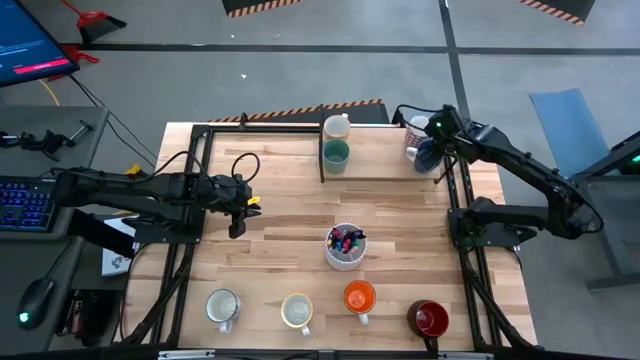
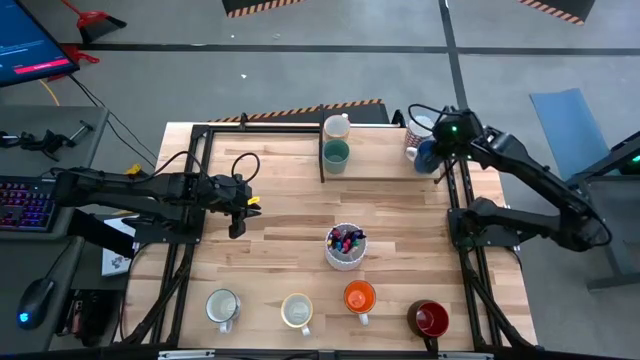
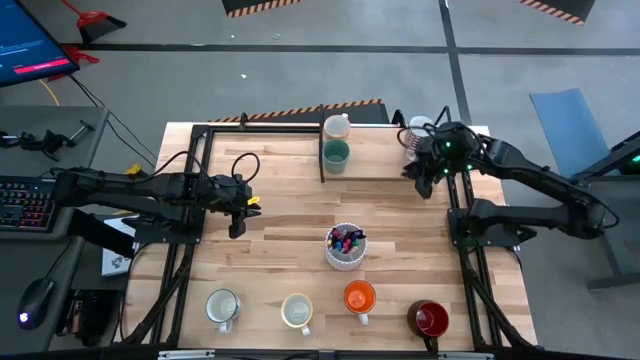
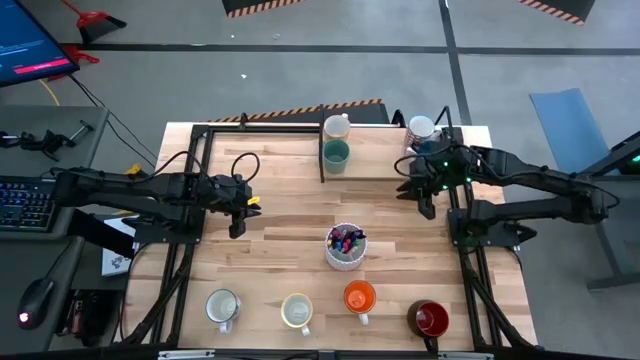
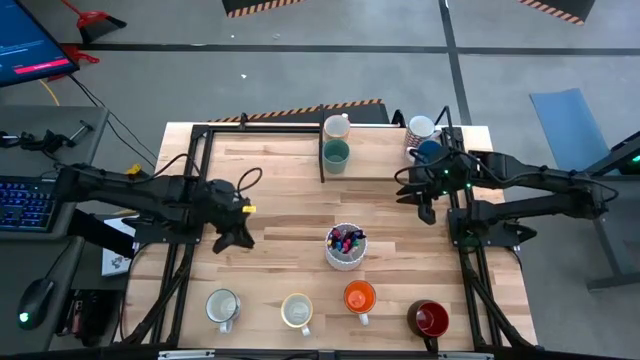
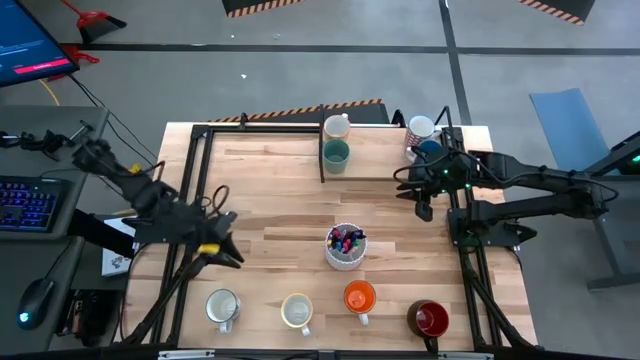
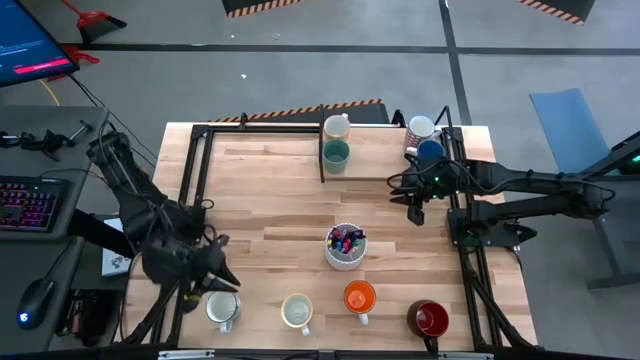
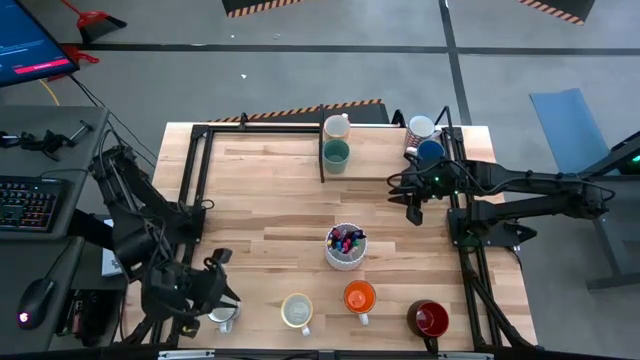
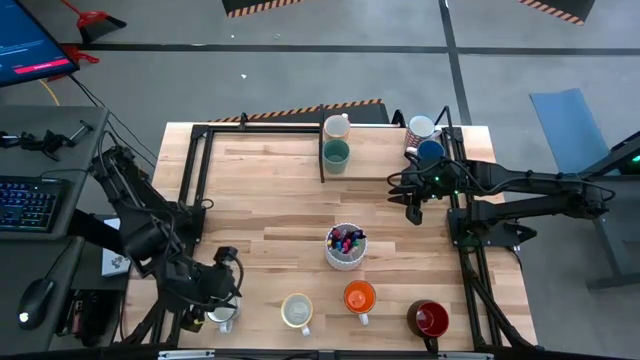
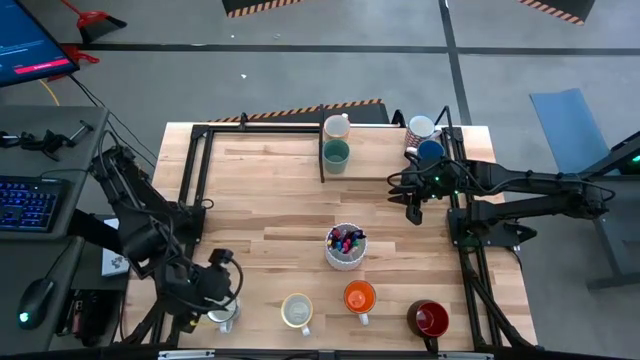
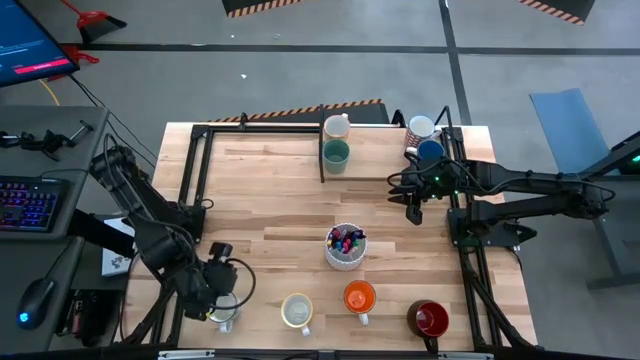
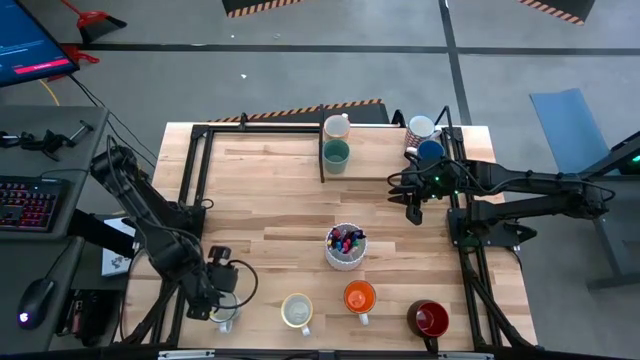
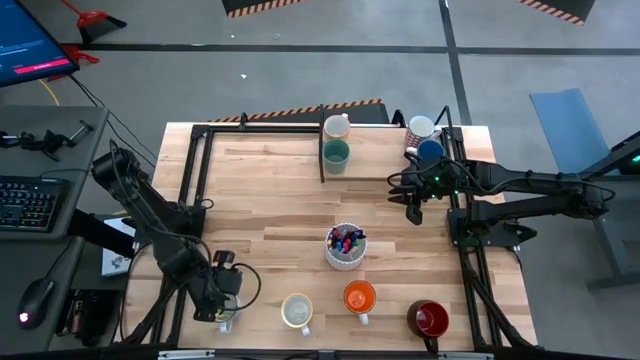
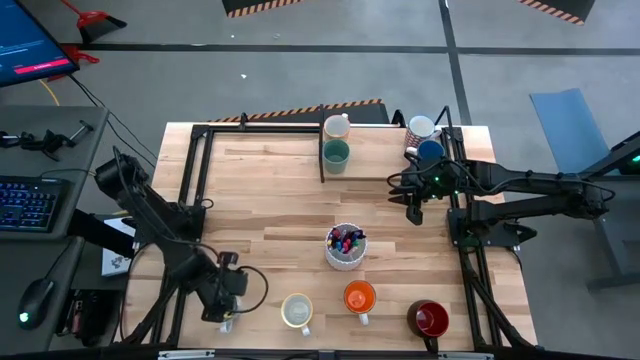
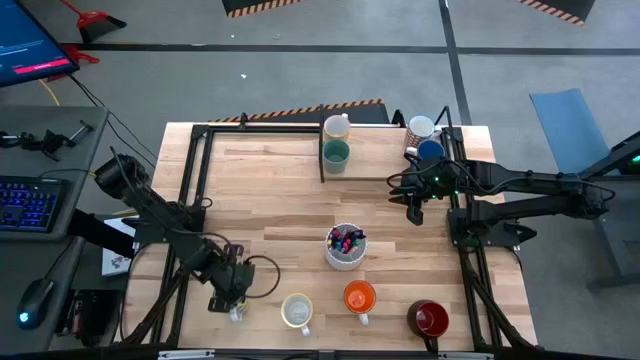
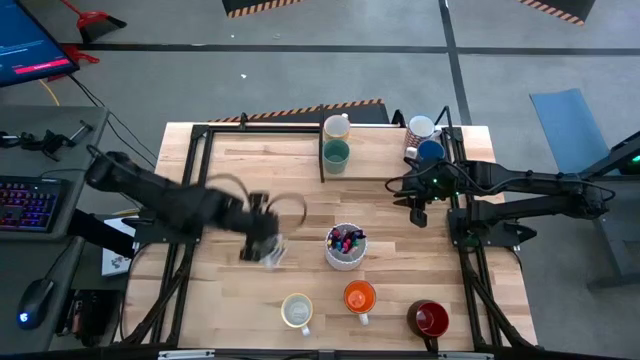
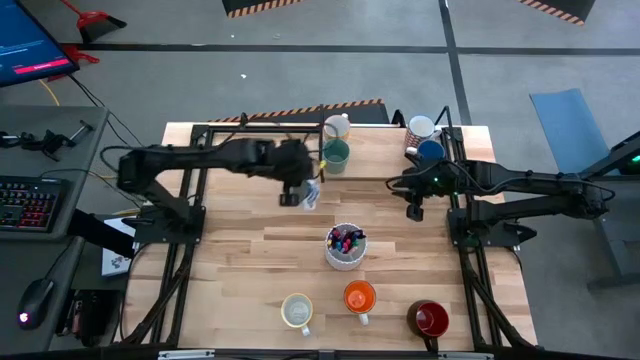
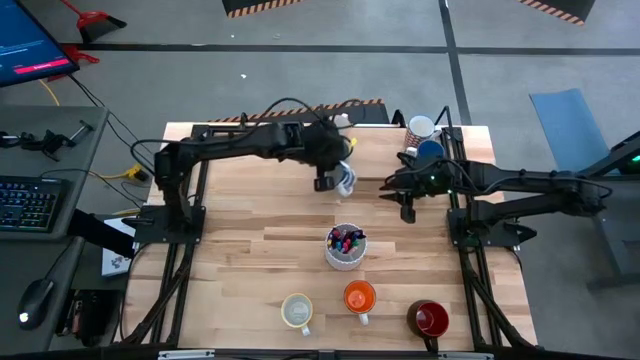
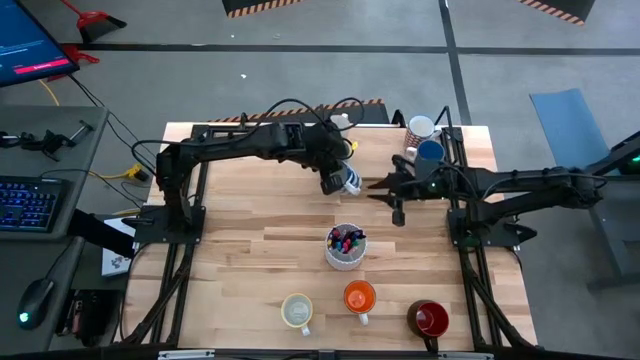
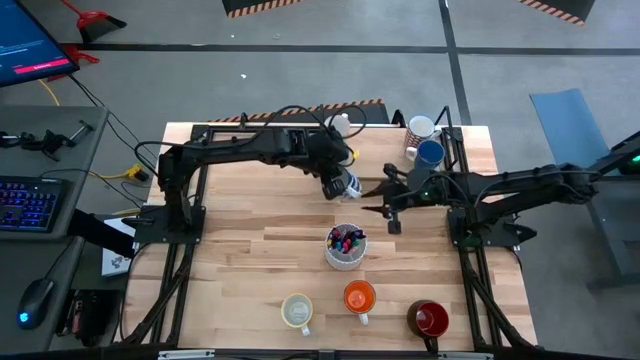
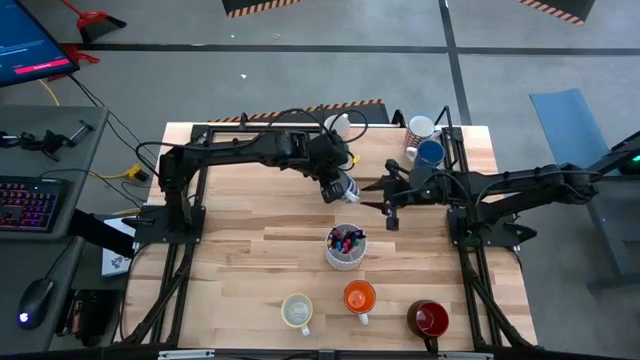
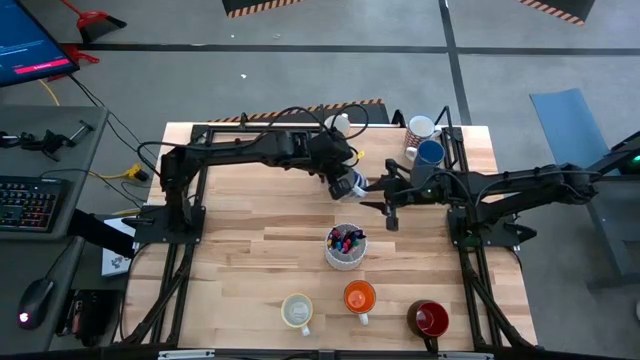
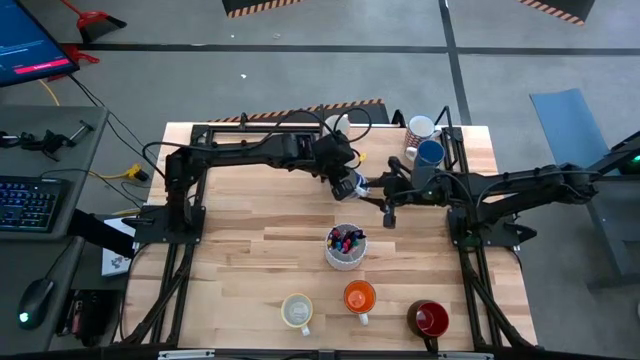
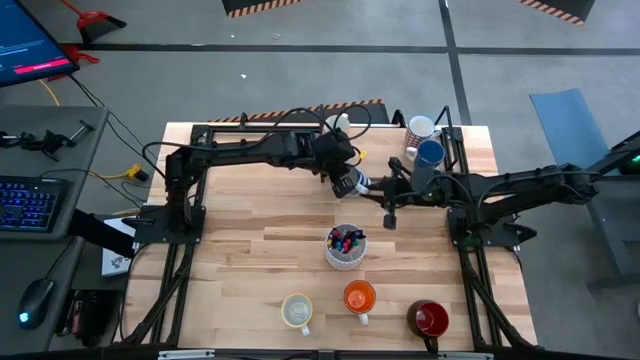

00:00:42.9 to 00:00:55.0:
Task: Place coffee mugs
Put the blue patterned mug on the shelf

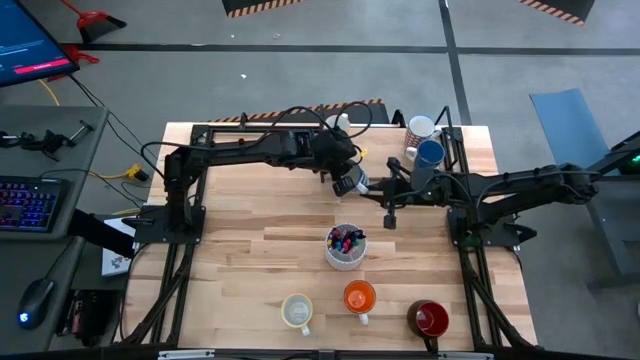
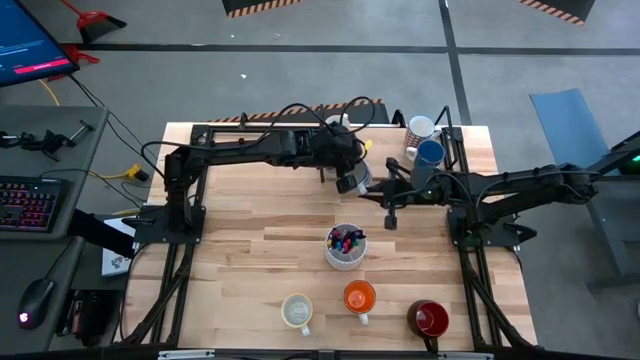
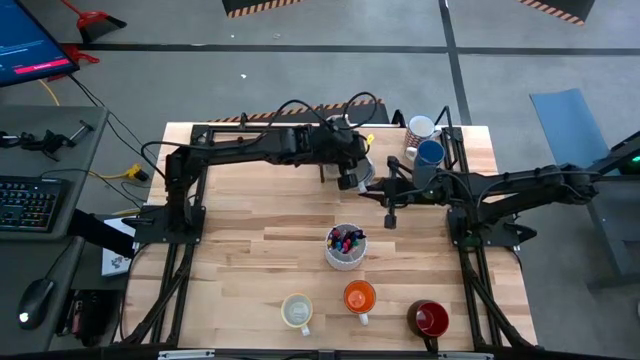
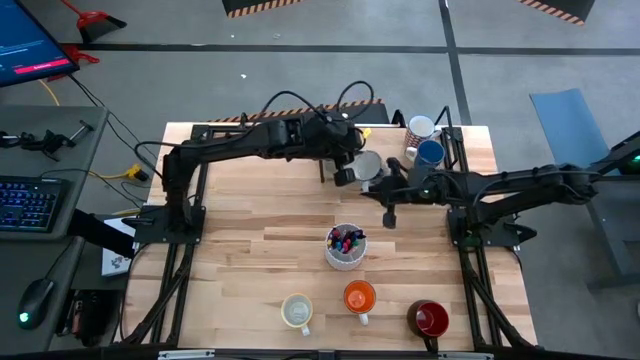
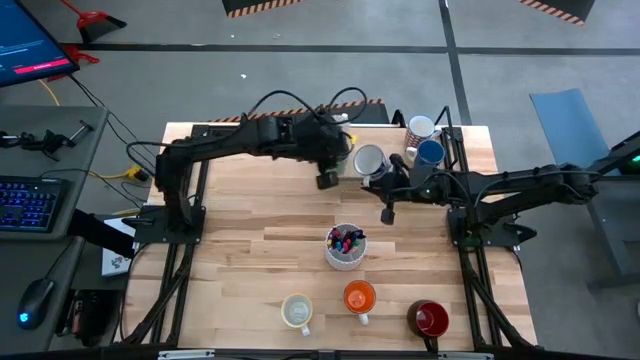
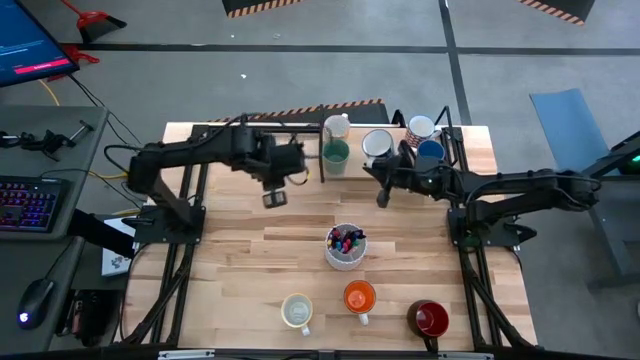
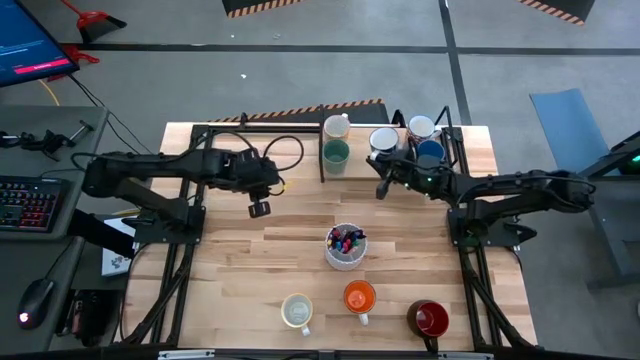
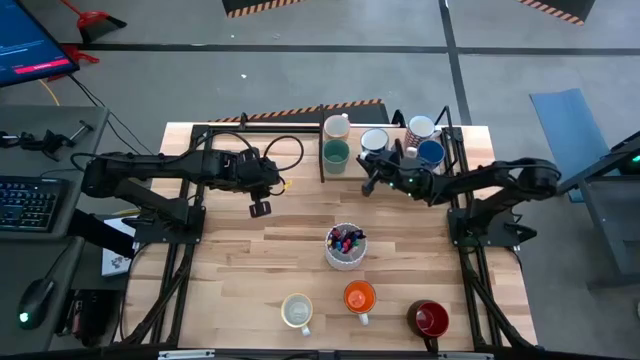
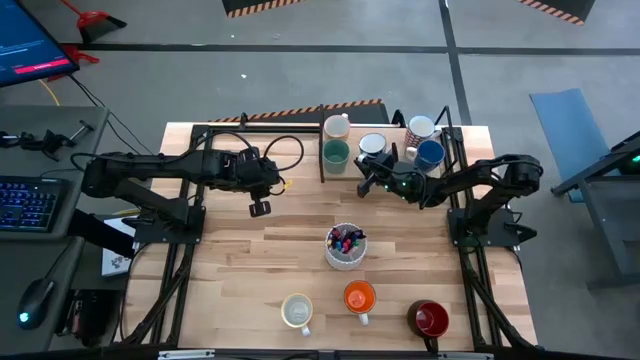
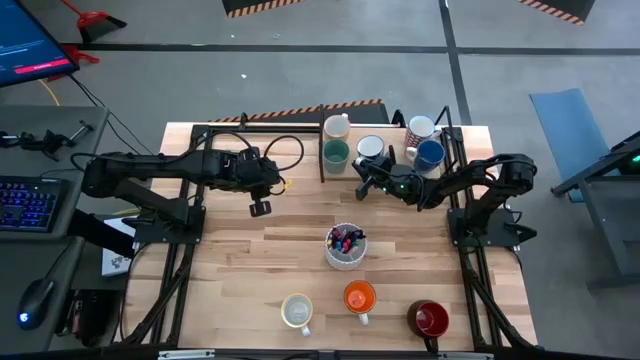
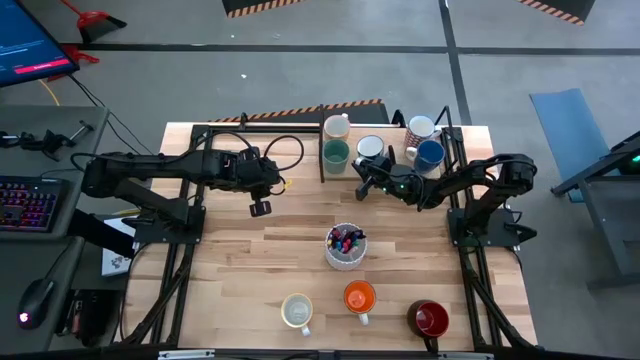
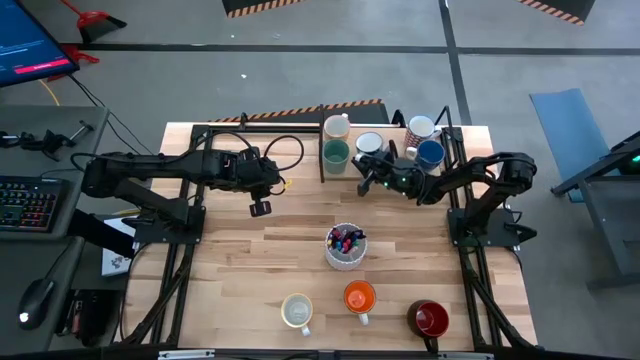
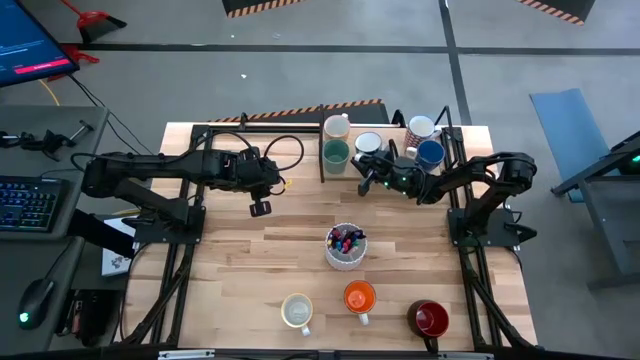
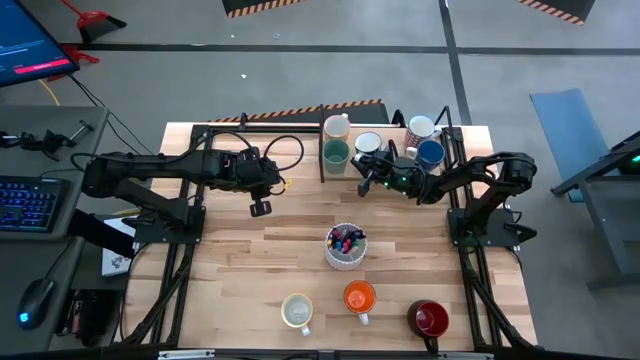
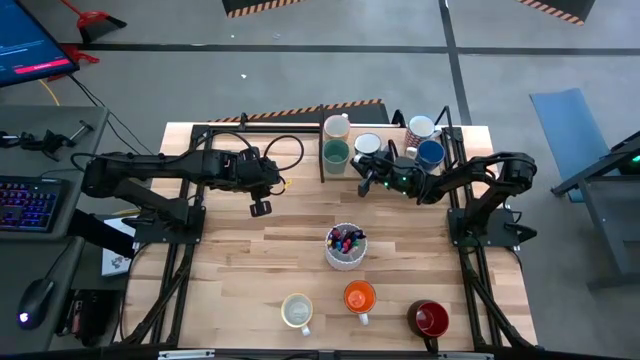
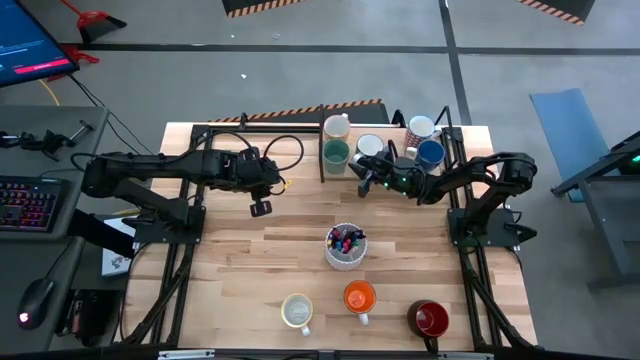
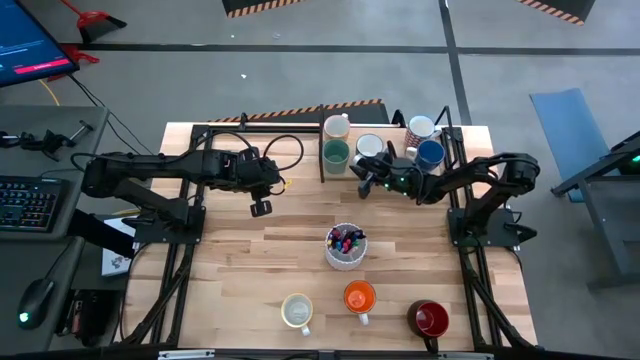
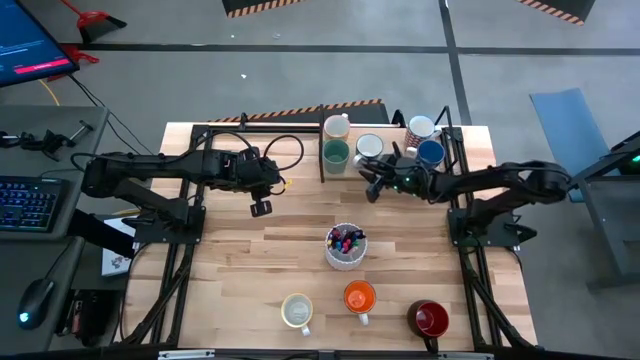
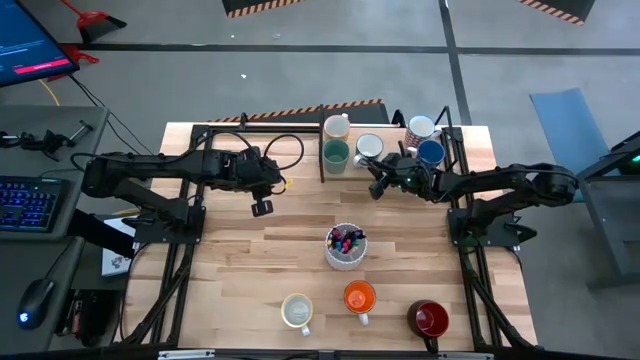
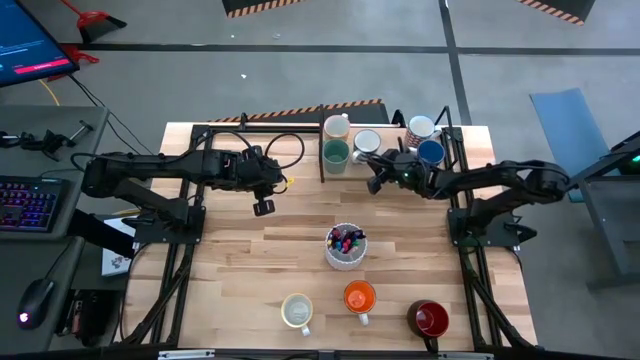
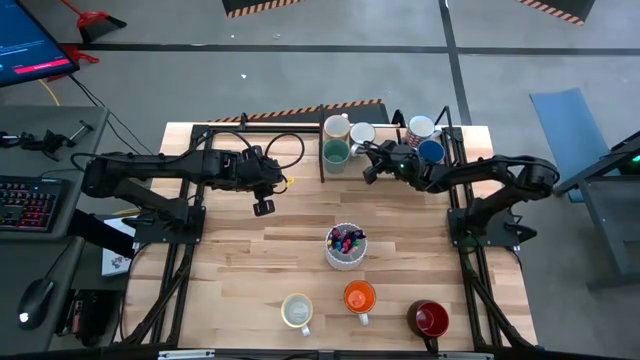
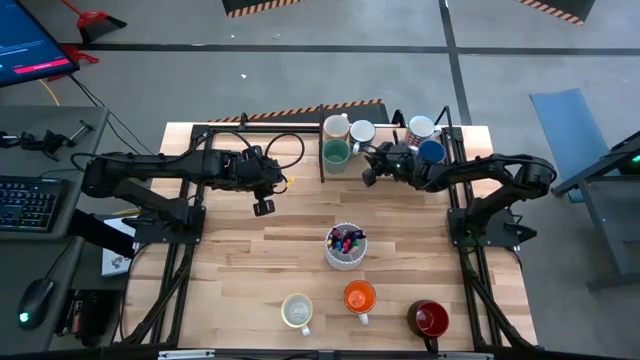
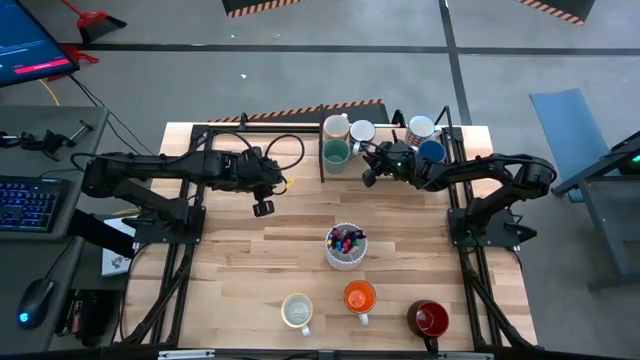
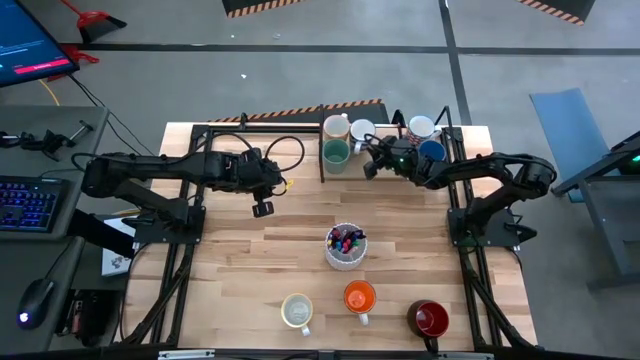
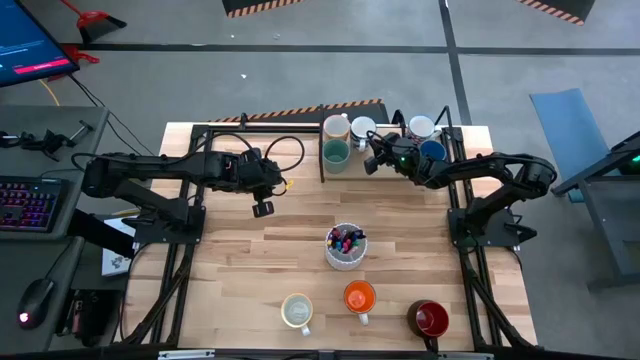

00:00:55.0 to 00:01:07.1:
Put the blue patterned mug on the shelf
